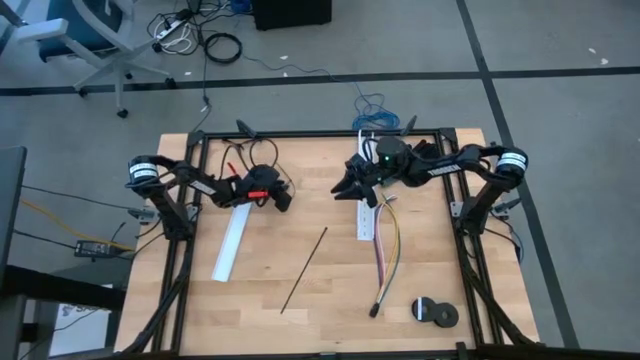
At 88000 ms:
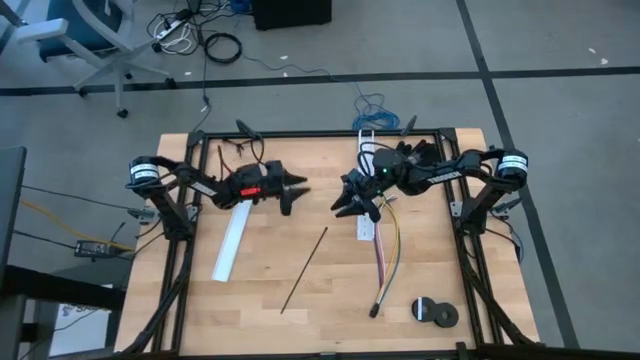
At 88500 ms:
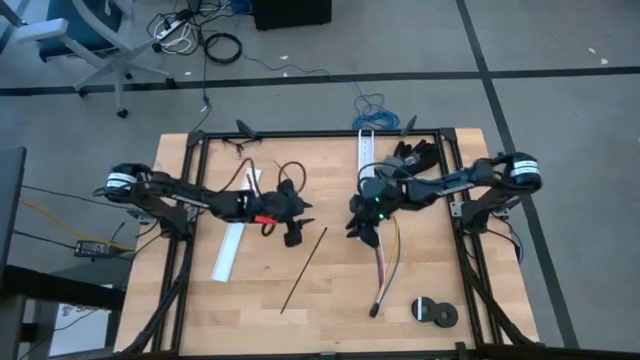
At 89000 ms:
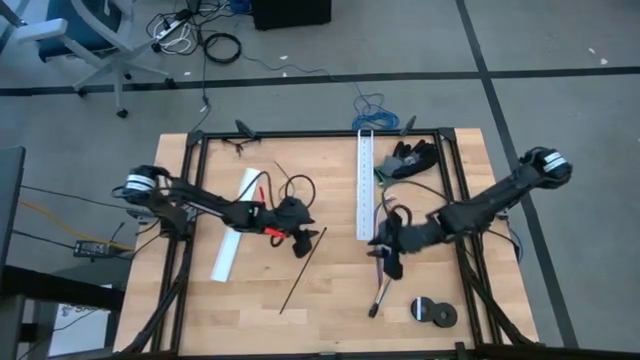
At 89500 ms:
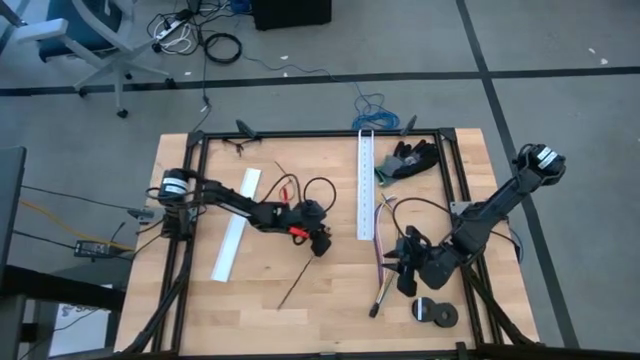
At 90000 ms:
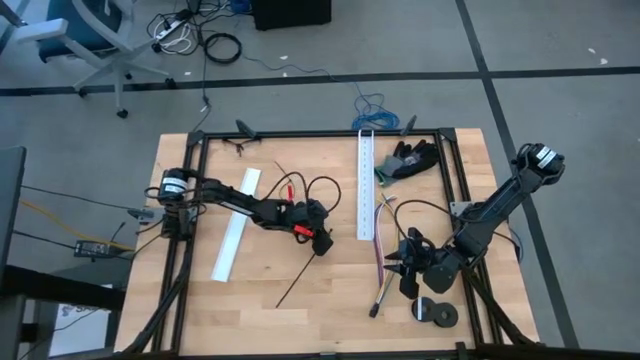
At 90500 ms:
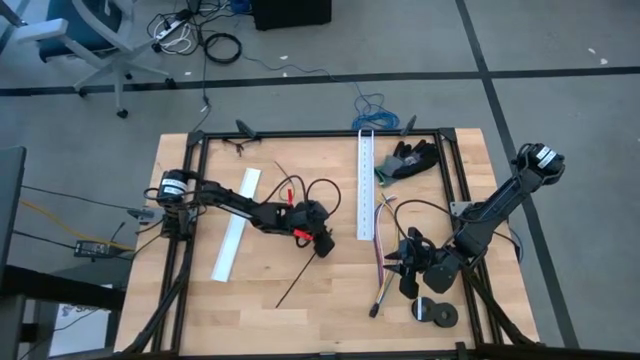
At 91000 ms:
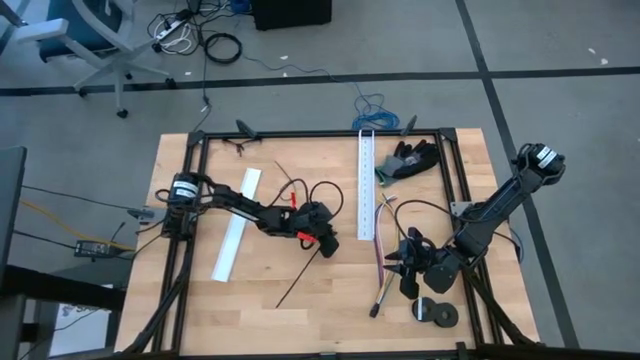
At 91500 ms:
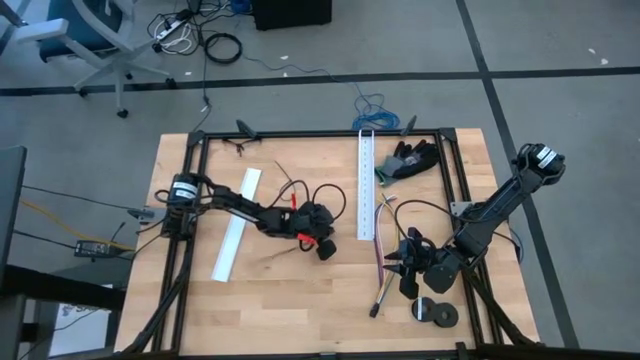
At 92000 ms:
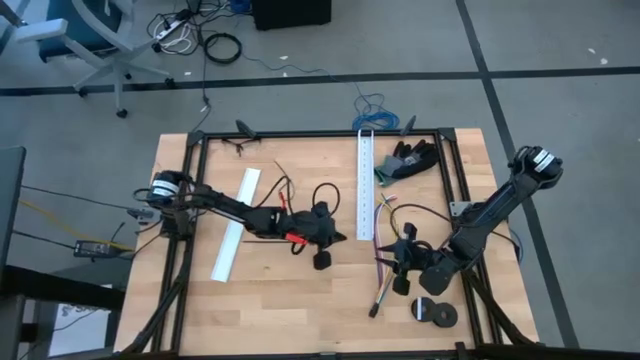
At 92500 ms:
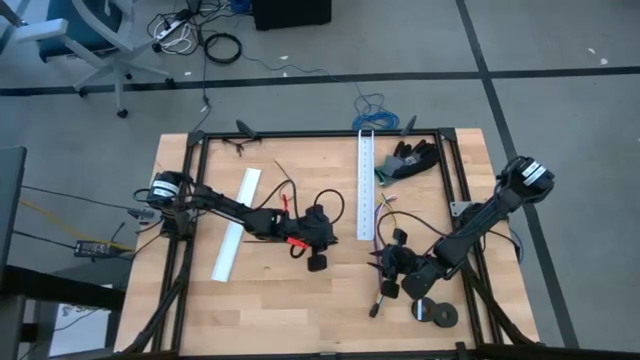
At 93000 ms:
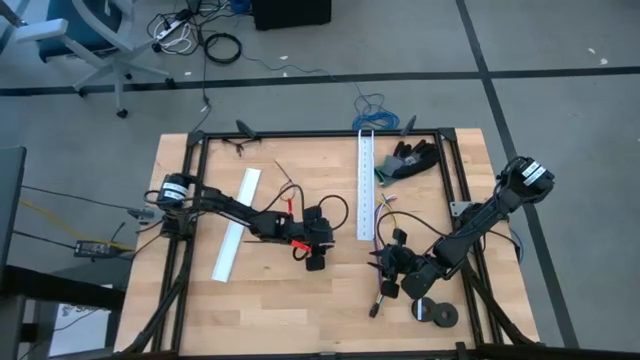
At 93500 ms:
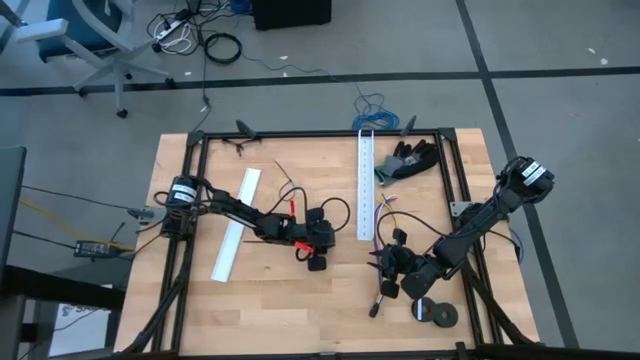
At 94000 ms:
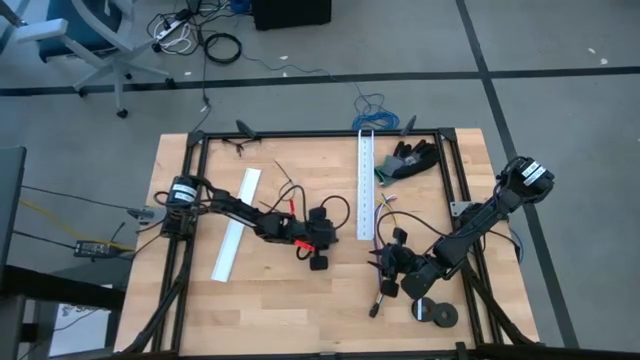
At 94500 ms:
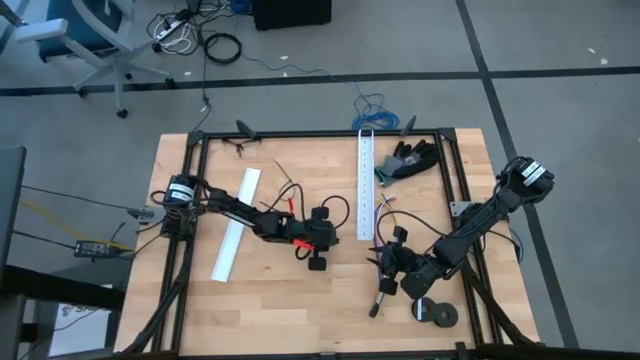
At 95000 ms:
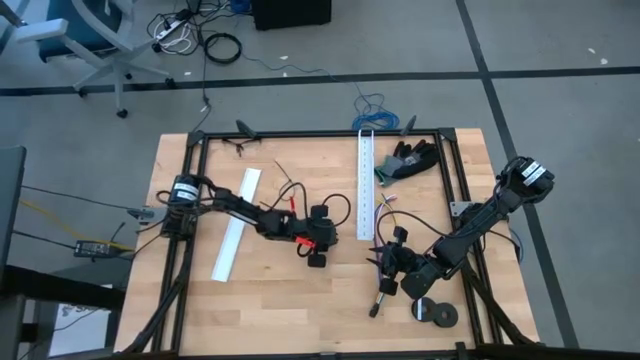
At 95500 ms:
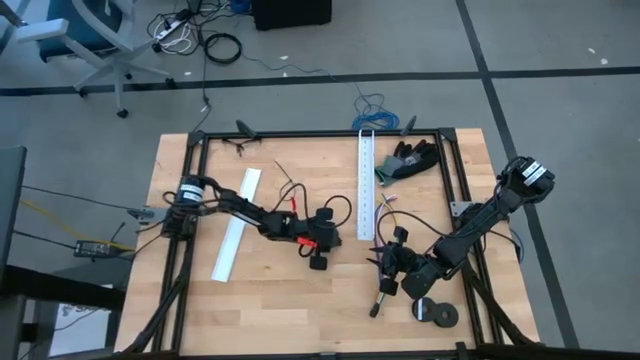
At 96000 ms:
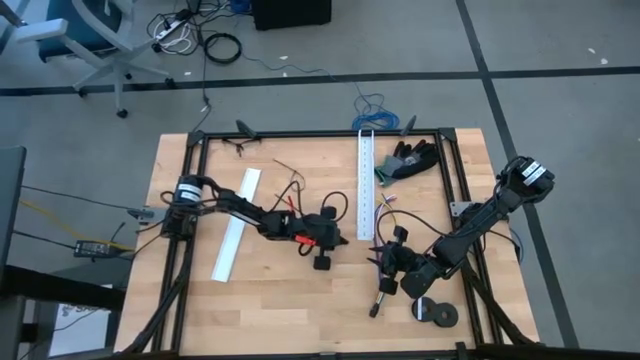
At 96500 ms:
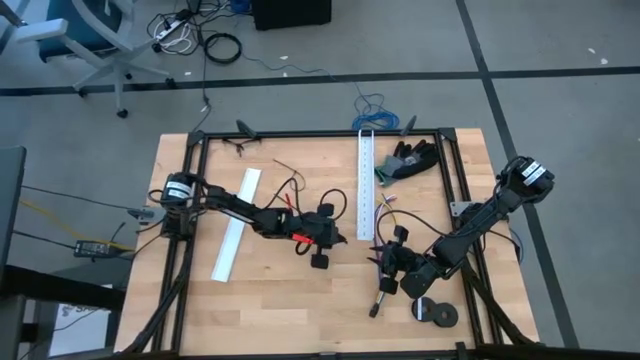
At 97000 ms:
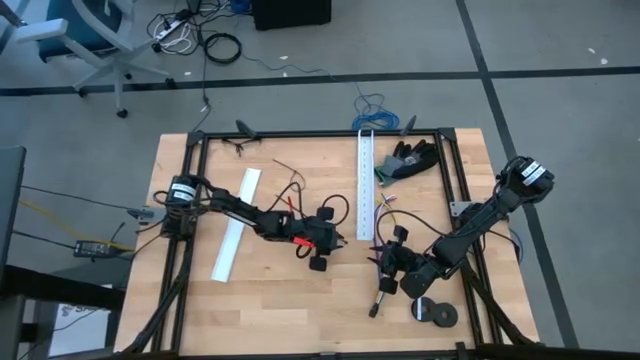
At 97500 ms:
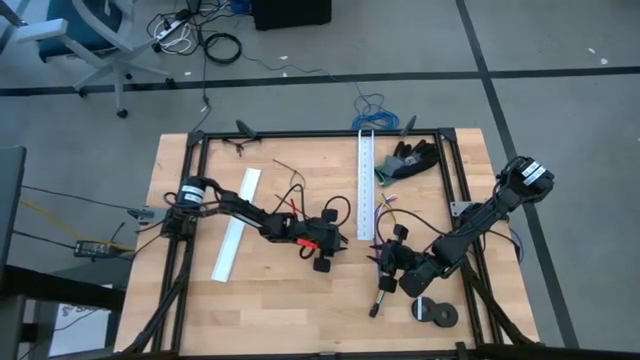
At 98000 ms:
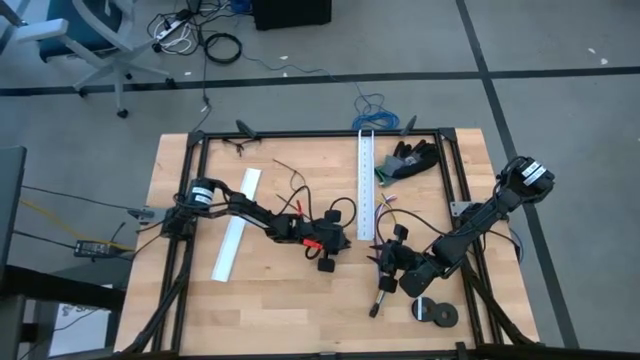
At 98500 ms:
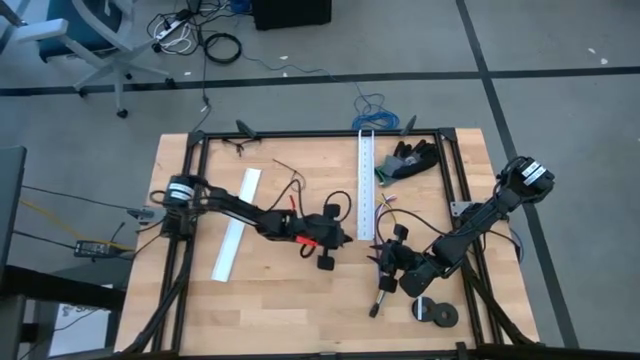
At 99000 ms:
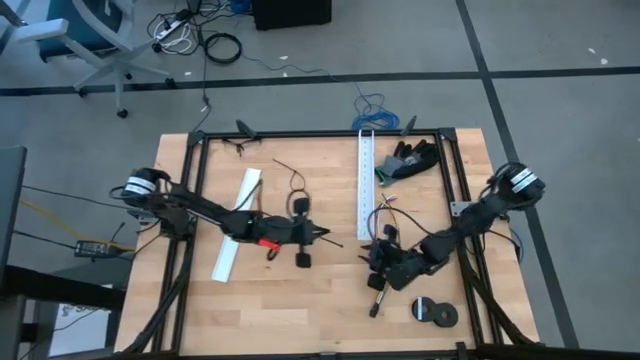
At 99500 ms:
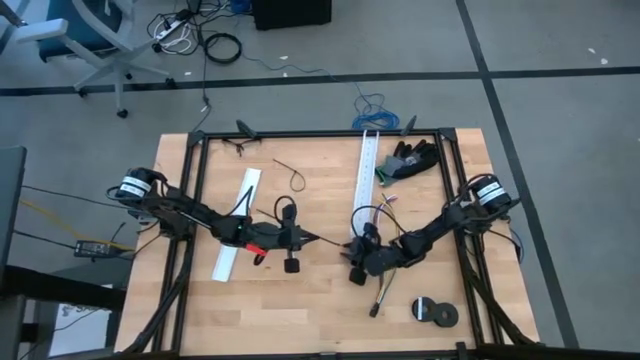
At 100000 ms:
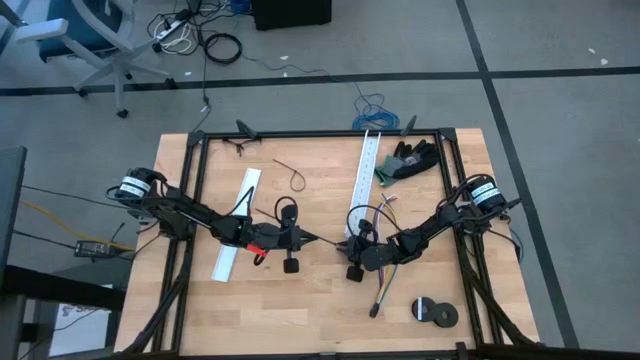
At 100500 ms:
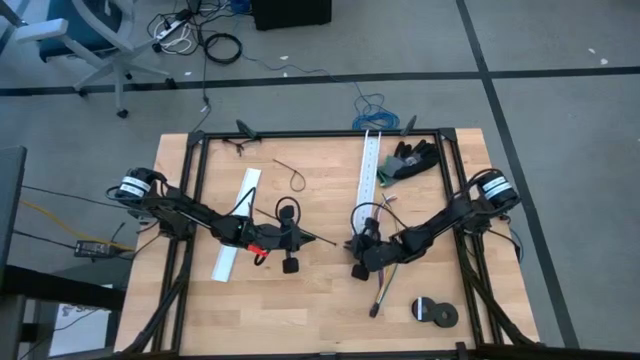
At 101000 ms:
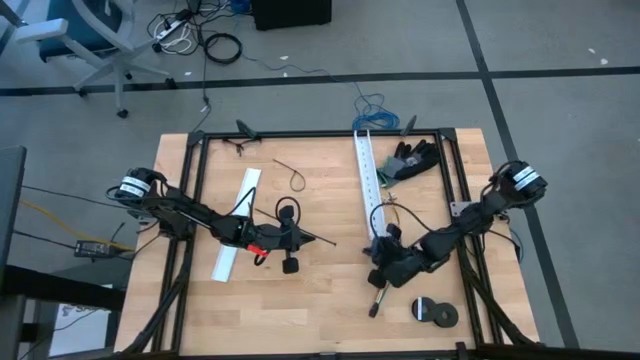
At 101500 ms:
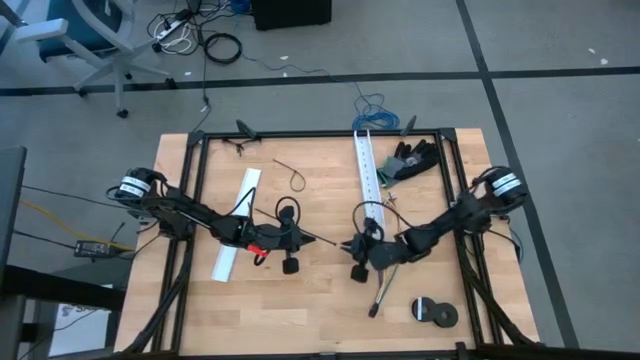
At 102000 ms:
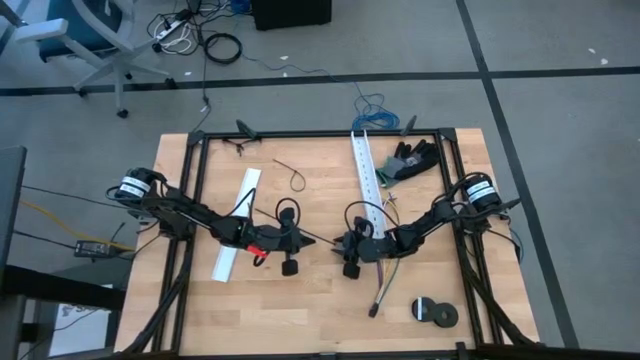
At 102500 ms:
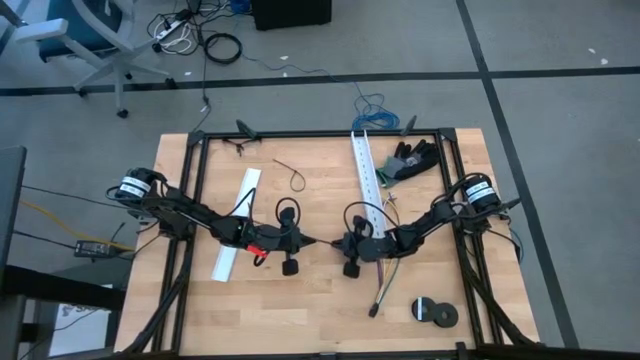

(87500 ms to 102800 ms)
Task: Ziptie cables
Prepare the black zip tie

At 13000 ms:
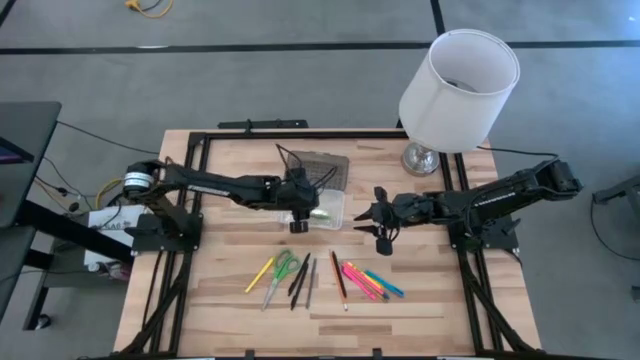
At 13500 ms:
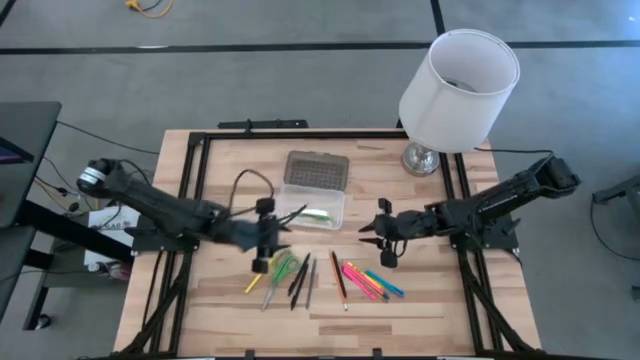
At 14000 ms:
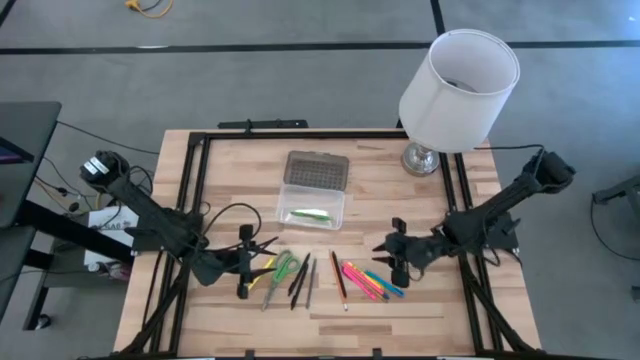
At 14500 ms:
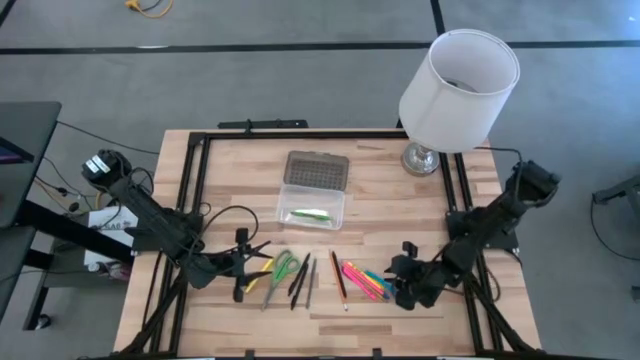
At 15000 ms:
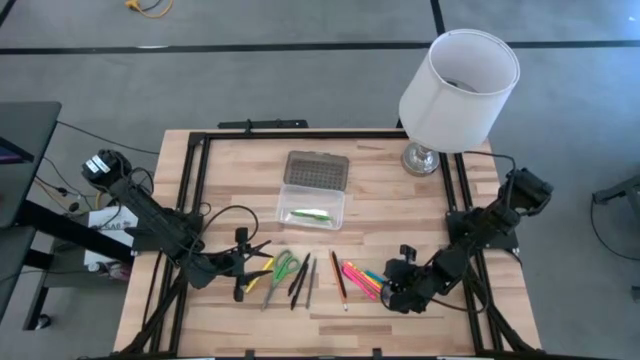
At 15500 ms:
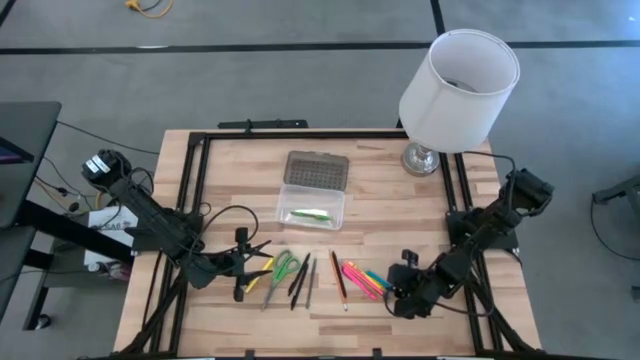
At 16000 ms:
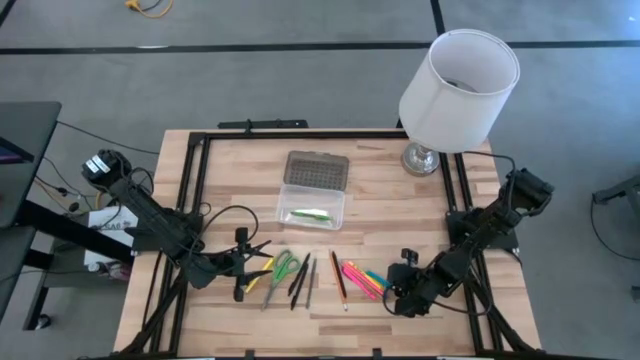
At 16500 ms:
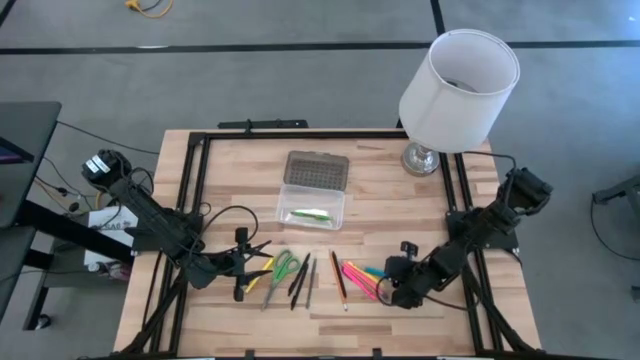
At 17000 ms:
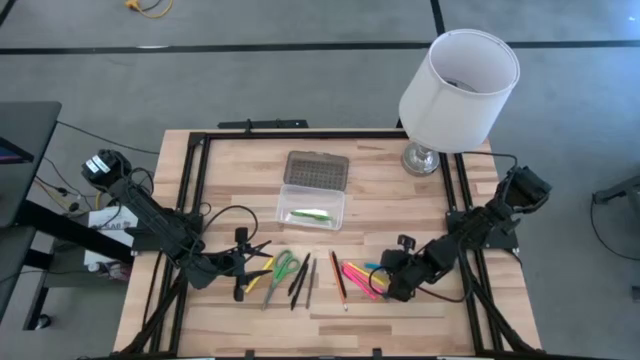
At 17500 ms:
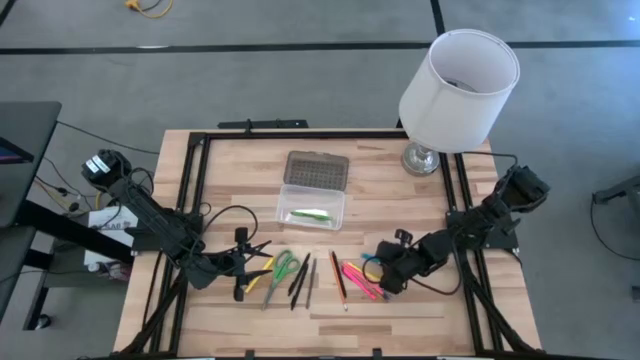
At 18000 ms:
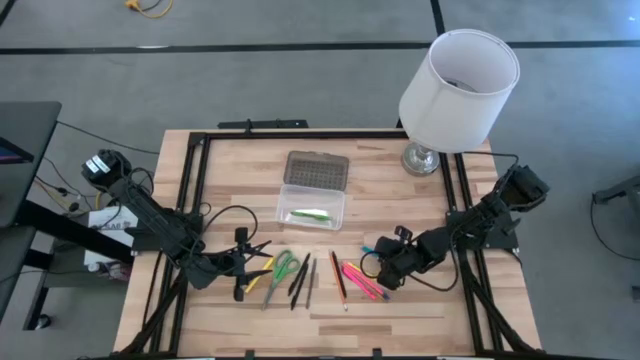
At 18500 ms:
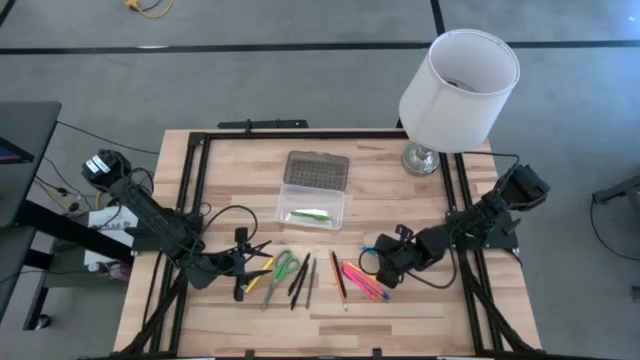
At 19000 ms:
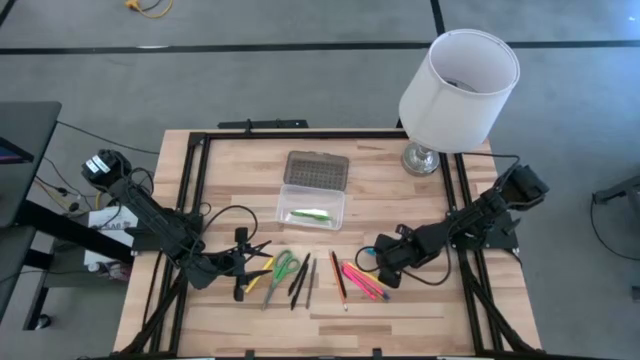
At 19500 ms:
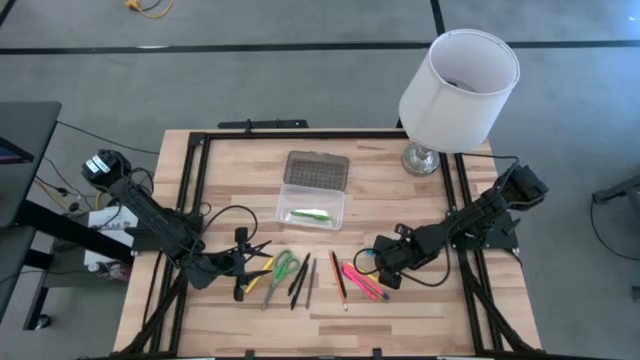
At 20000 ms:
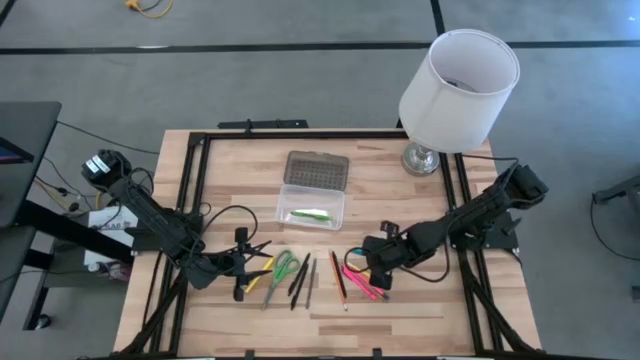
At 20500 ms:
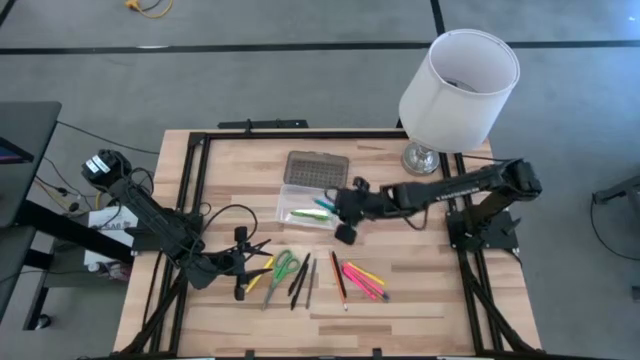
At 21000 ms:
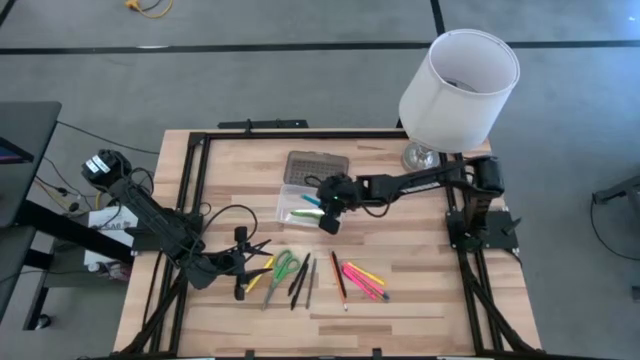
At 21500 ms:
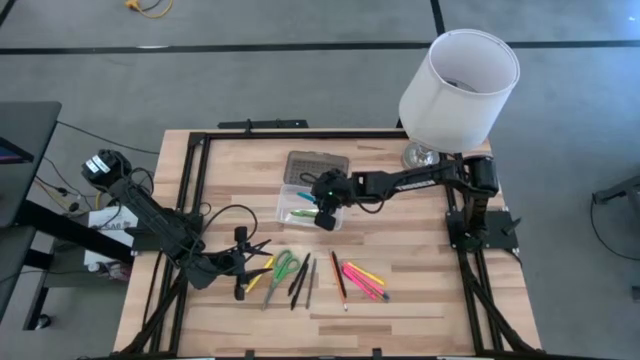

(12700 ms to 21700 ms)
Task: Pick & place school supplies into a supply box
Put the blue pen into the black supply box
